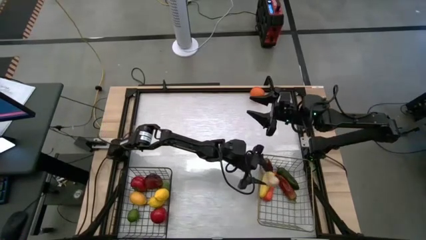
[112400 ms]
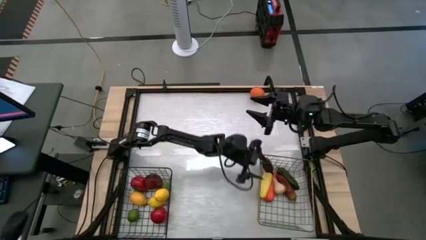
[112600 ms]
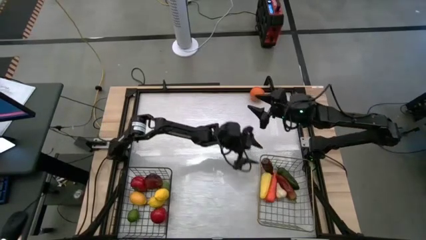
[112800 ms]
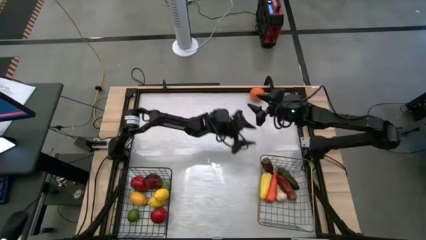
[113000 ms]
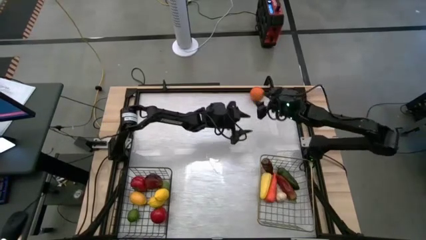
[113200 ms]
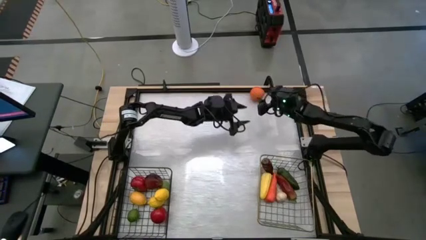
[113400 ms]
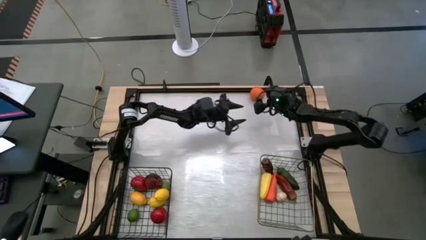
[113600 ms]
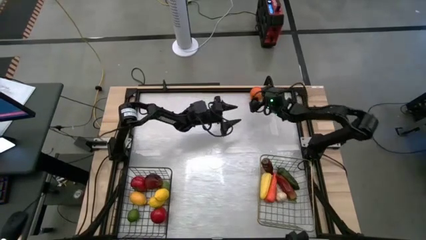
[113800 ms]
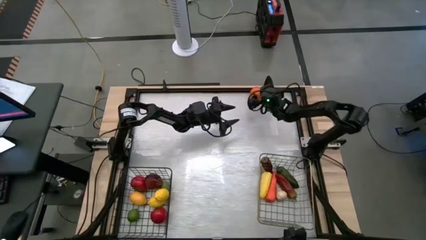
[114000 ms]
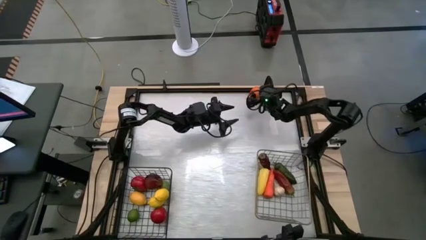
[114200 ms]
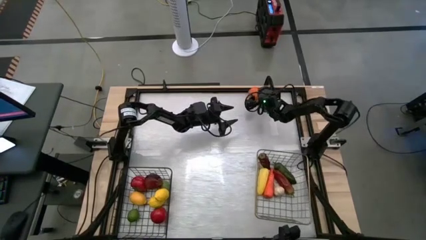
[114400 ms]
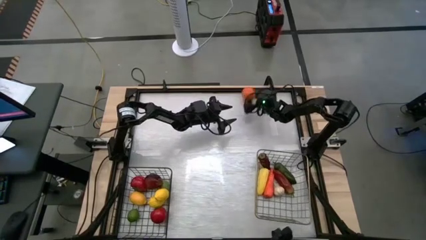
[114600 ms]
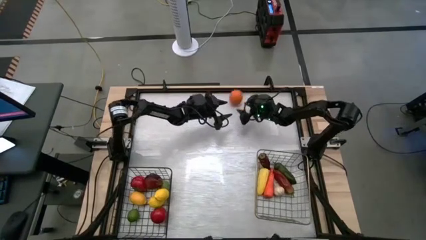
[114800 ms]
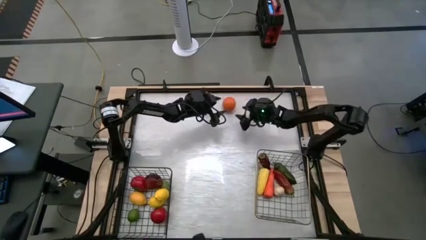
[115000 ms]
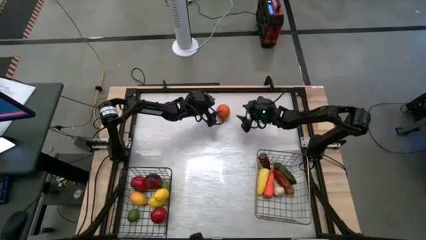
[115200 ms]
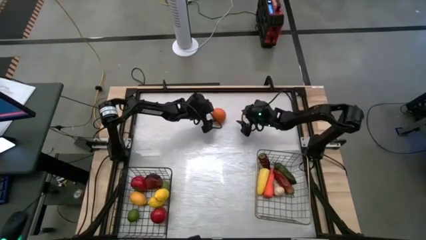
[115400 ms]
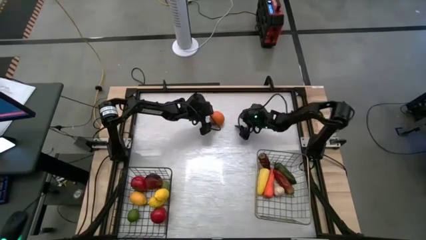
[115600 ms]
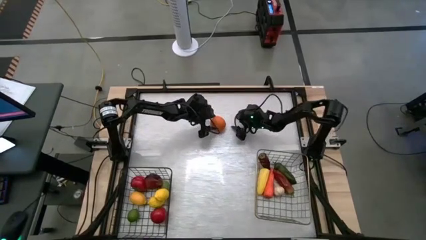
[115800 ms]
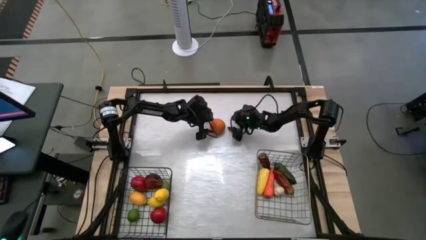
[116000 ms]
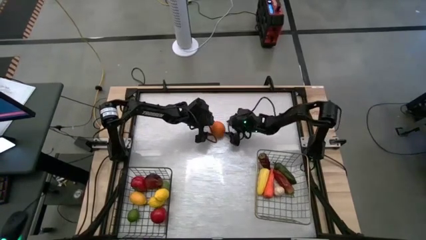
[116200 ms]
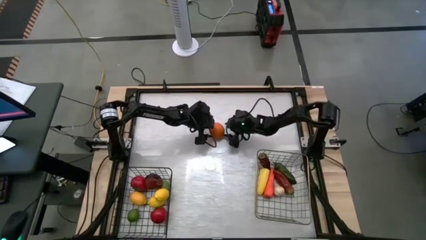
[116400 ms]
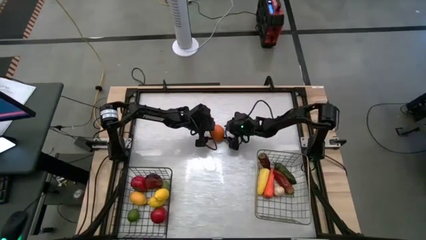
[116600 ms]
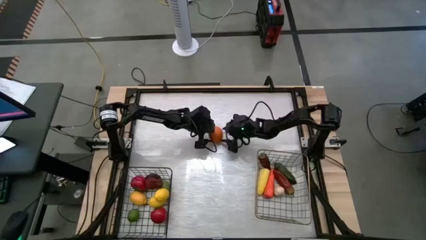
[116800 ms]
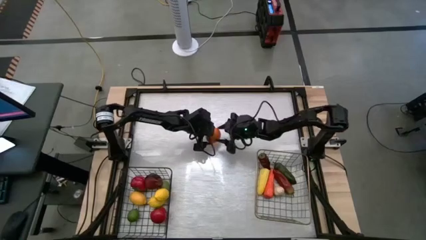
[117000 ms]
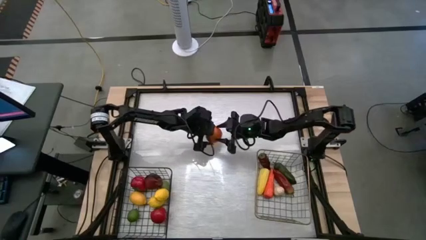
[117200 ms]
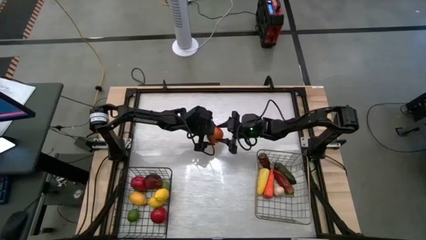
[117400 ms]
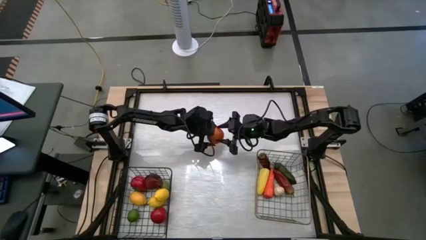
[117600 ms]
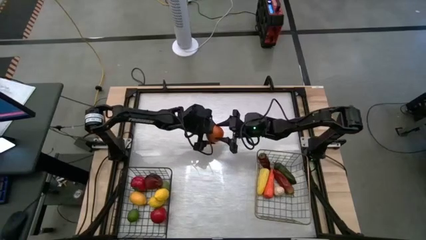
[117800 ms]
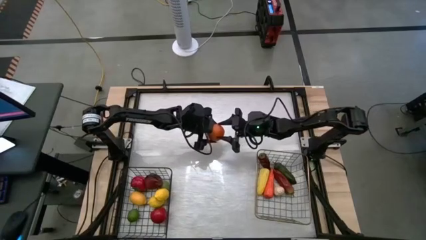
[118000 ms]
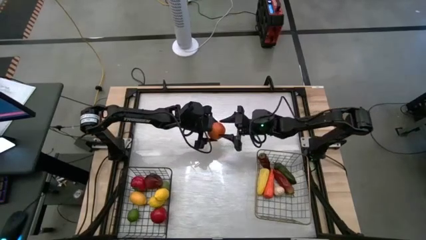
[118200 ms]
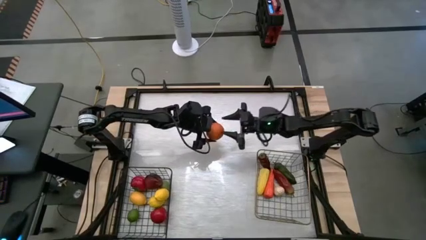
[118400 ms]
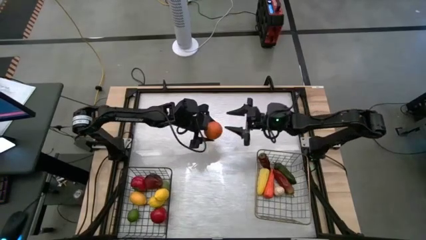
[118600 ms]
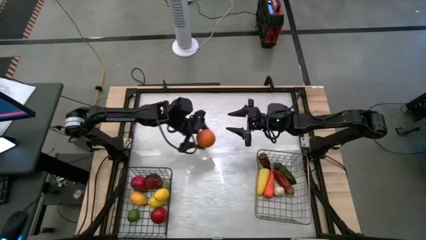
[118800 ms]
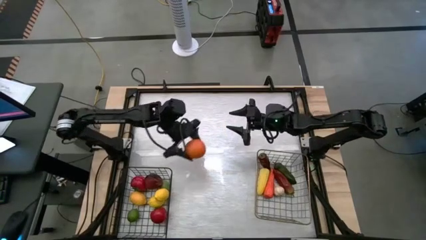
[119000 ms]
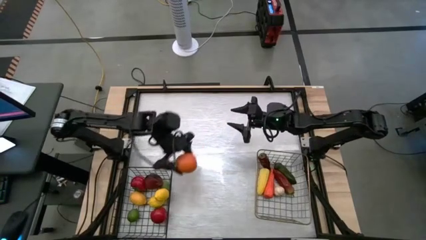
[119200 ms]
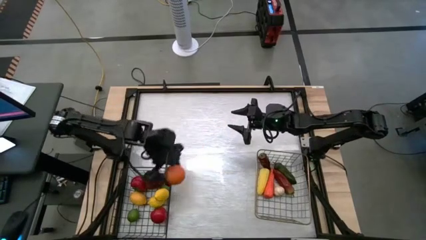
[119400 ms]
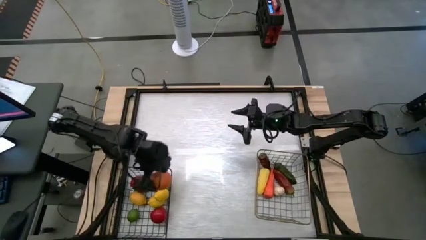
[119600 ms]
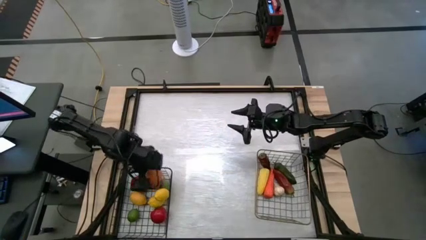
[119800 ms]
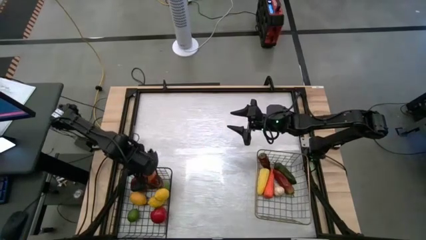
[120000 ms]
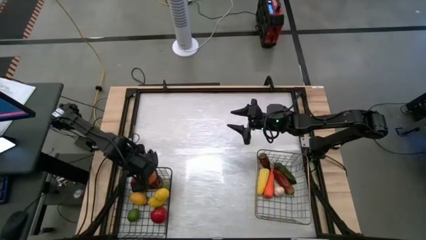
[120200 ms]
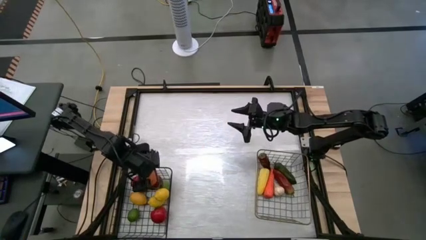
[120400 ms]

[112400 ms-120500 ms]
Task: Sort produce into baskets
Put the orange into the black wire basket

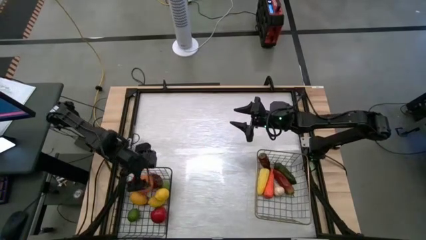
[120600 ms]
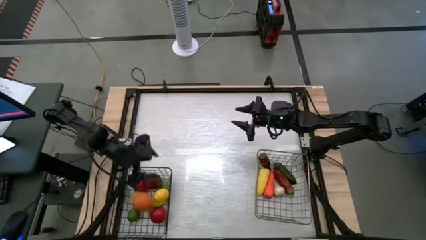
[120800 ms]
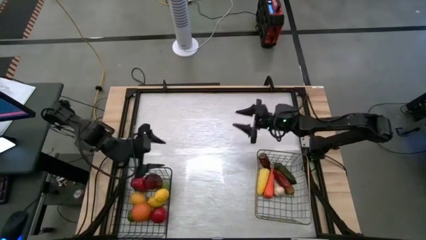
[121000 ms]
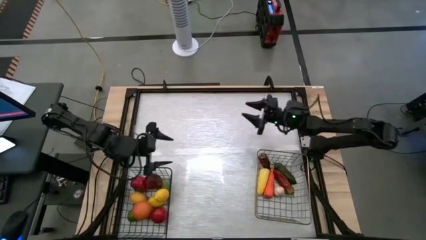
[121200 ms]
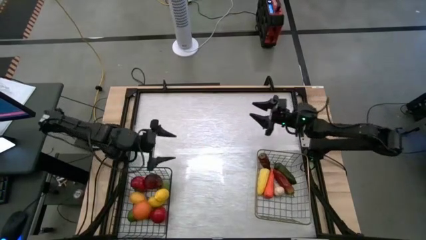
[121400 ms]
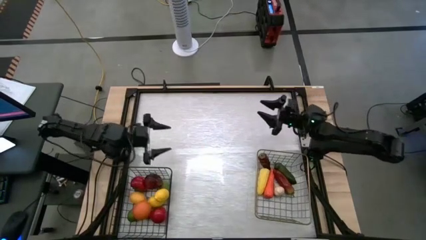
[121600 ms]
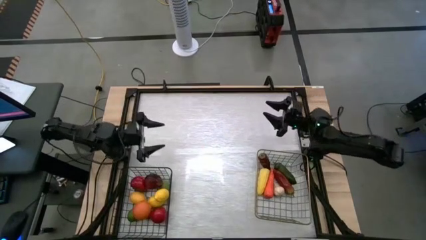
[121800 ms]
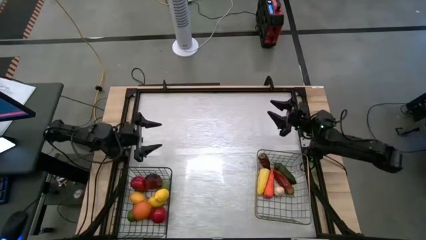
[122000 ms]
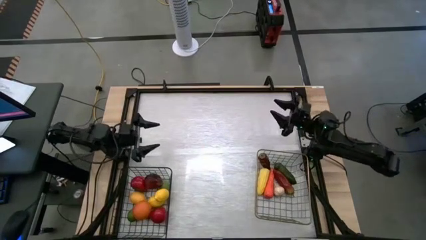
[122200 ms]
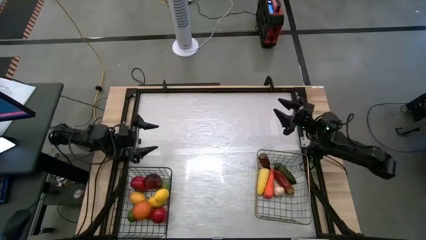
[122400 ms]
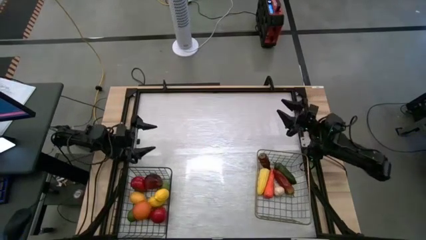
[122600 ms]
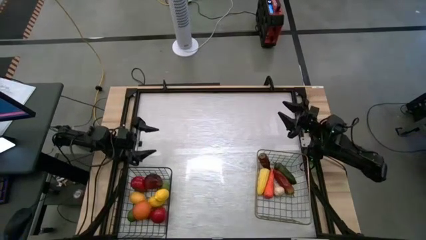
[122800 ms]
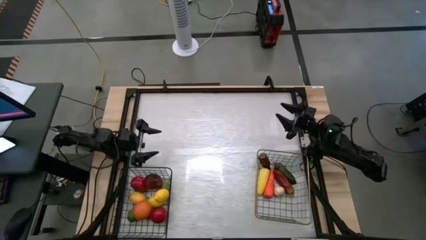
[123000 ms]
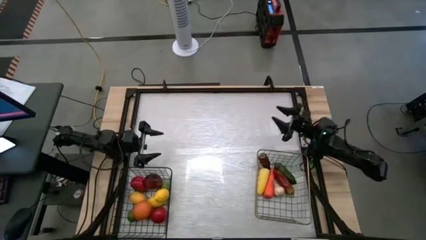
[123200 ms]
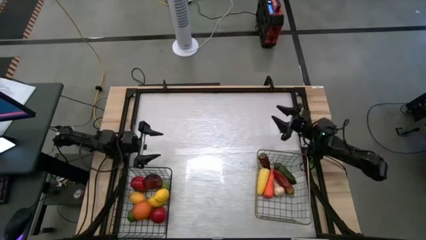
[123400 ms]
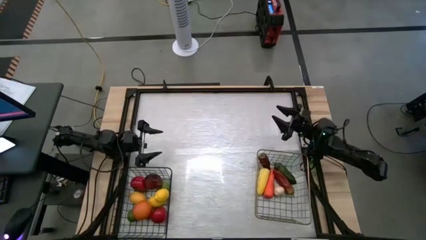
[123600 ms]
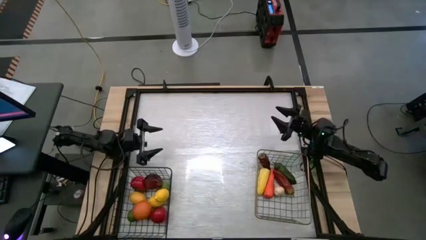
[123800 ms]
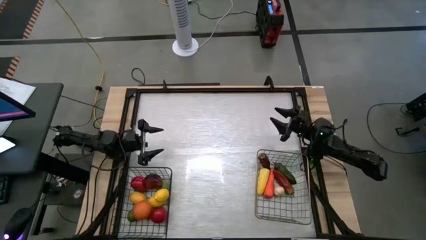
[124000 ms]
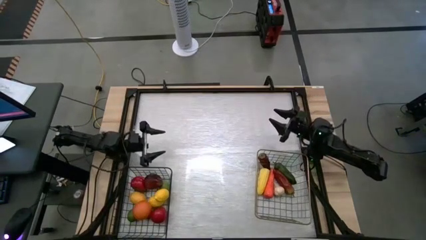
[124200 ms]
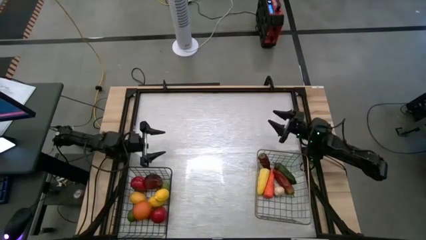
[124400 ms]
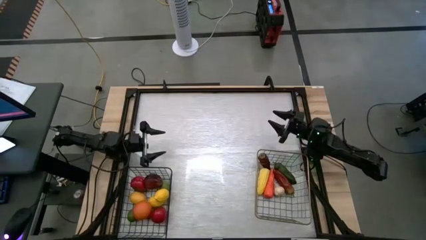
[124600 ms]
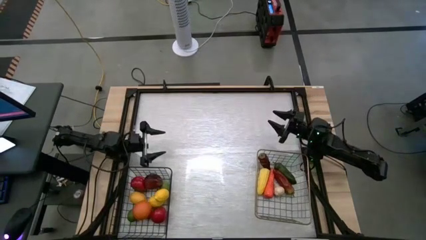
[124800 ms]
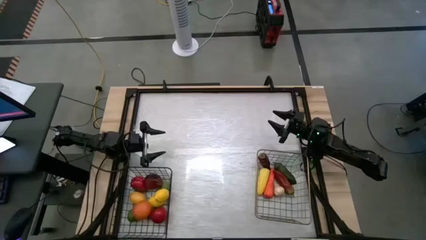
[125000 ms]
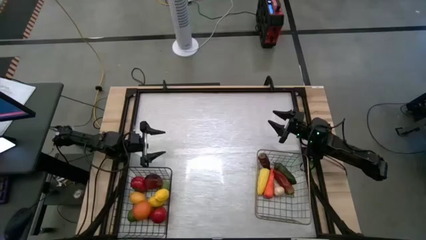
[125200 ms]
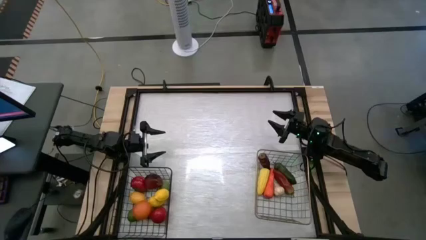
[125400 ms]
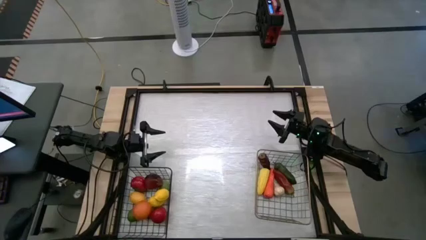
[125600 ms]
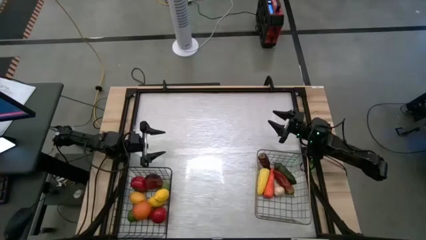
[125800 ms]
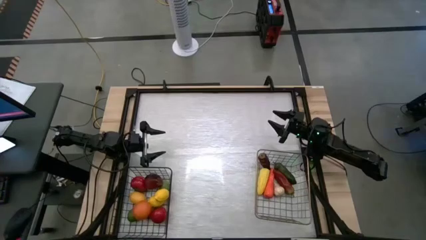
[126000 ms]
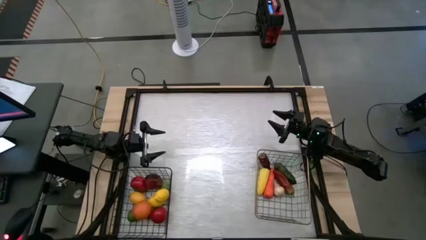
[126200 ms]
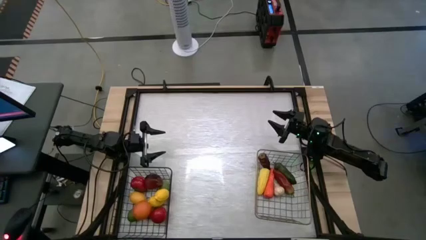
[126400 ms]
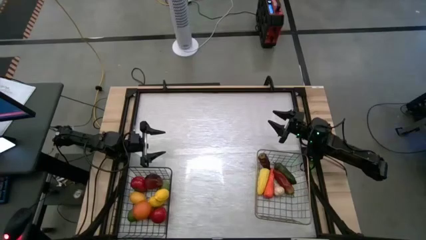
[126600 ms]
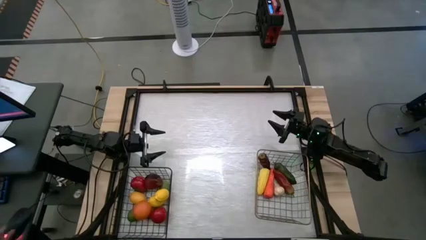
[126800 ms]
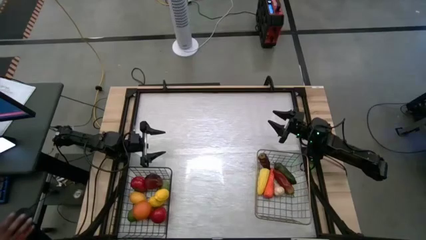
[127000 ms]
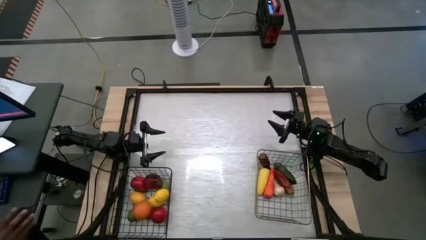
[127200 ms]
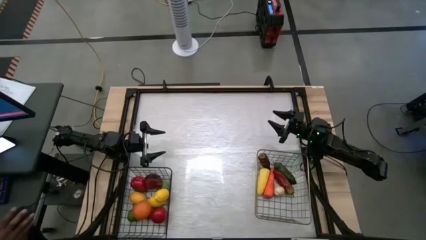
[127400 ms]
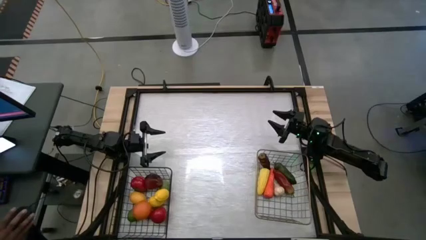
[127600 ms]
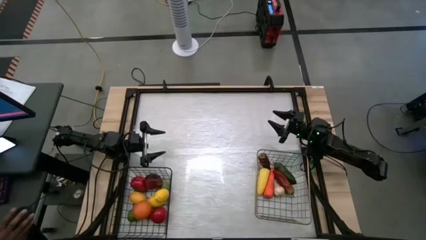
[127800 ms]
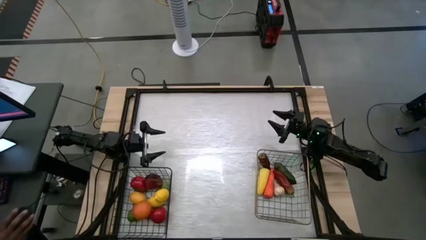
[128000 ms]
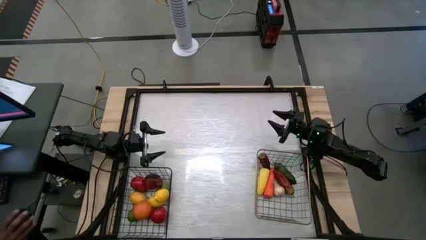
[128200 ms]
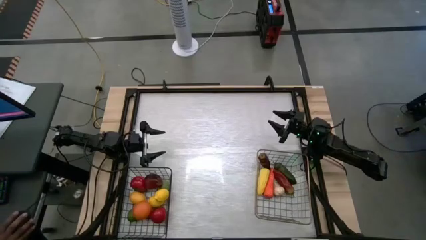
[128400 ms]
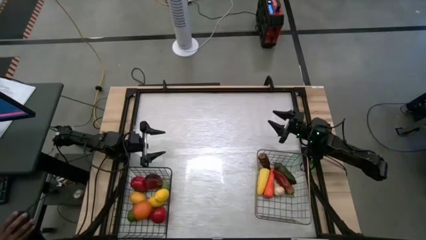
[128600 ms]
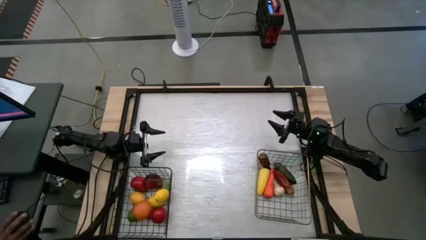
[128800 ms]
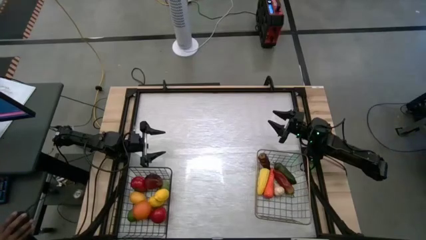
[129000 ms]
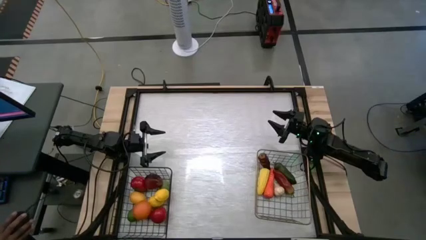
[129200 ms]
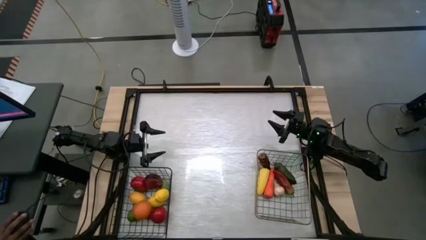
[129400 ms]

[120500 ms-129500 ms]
Return to Home Position
